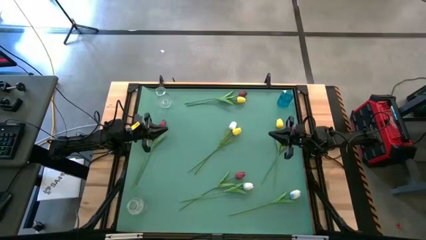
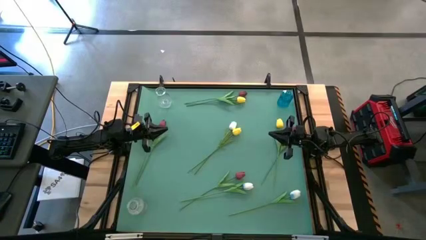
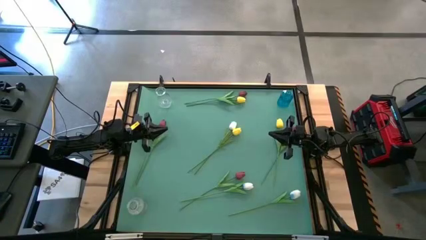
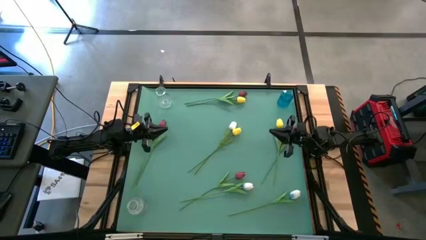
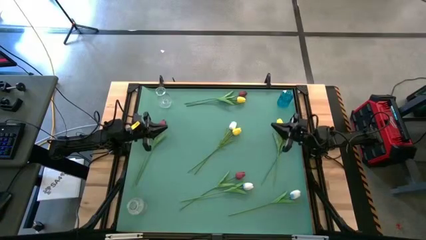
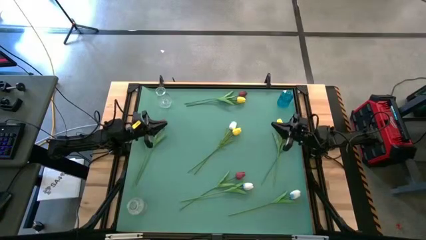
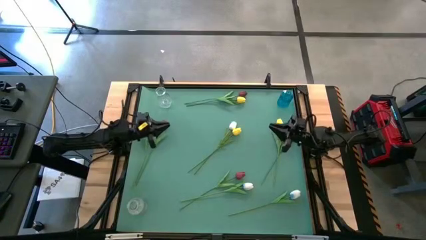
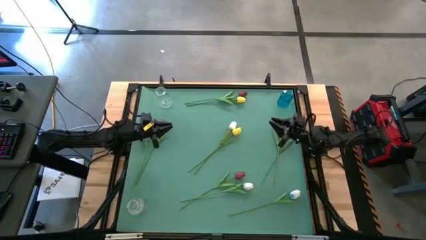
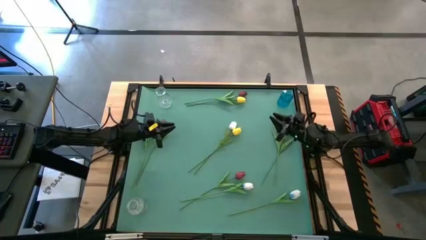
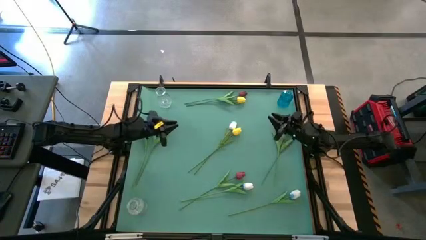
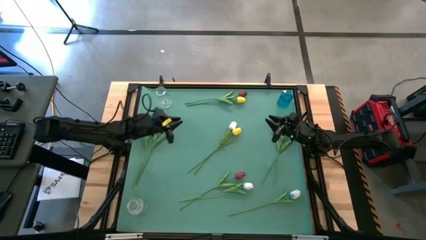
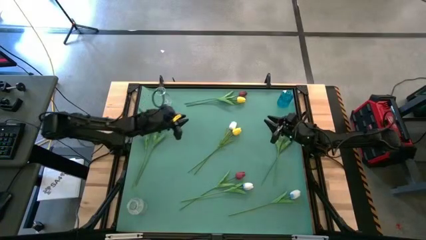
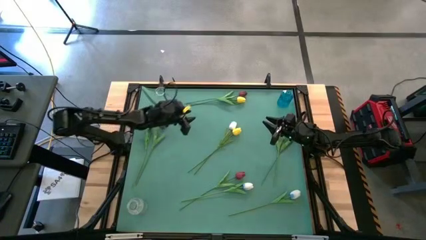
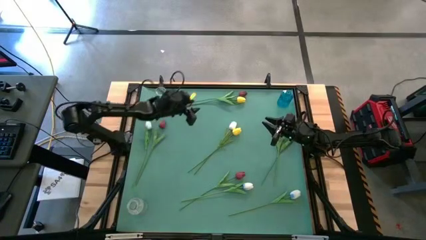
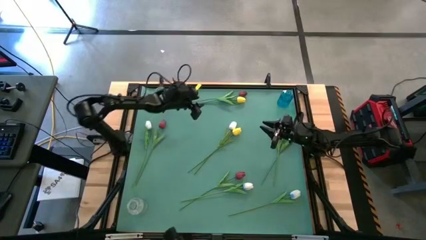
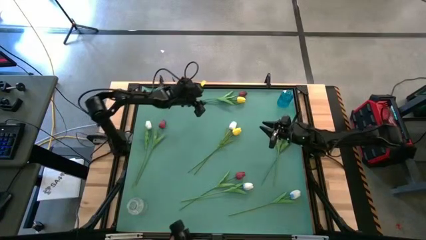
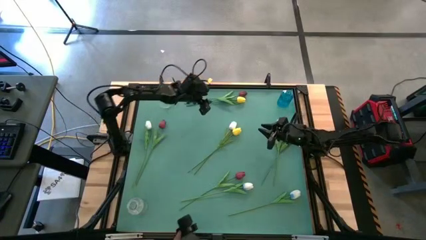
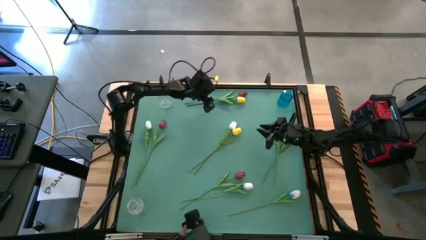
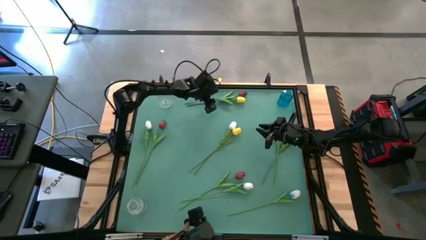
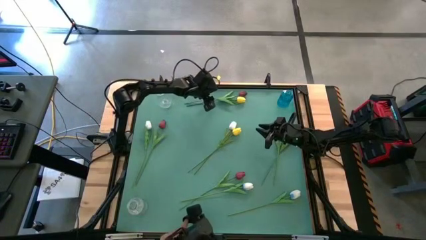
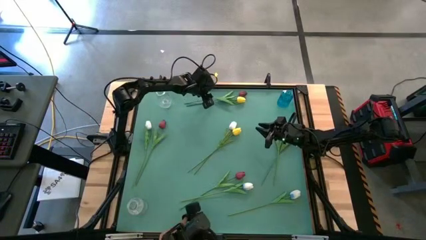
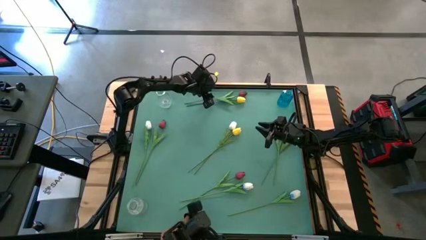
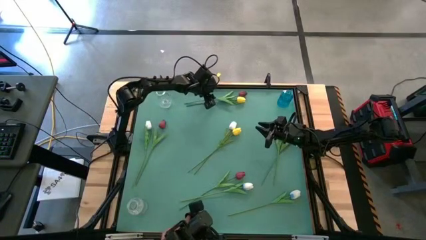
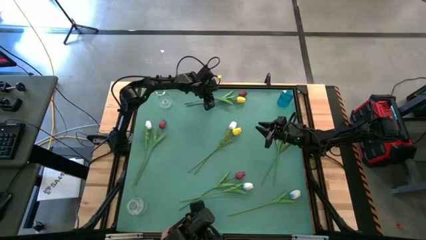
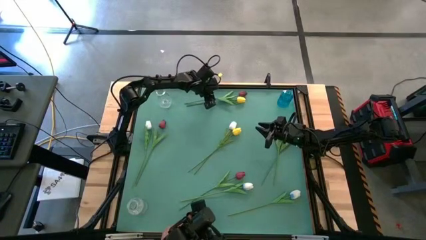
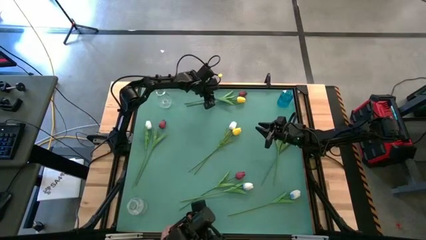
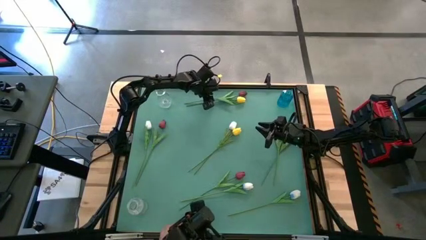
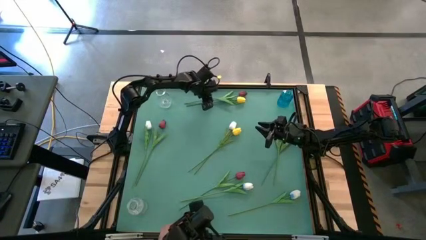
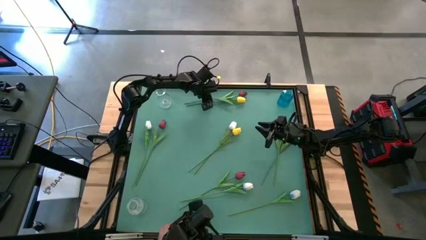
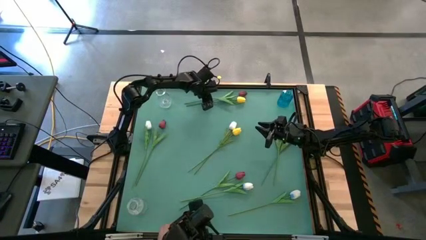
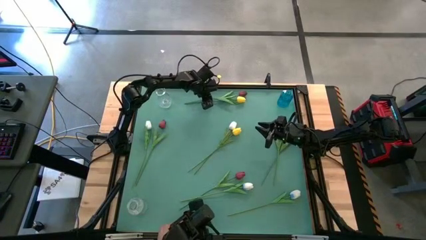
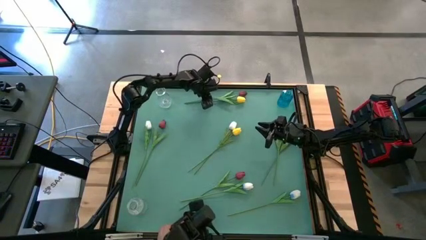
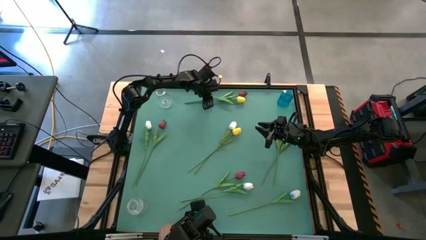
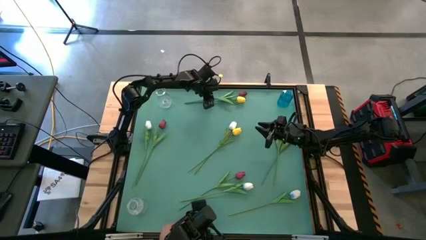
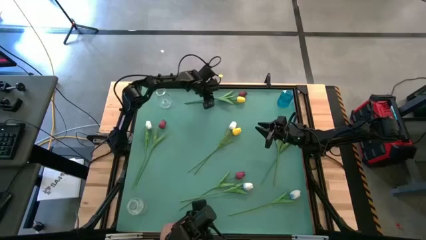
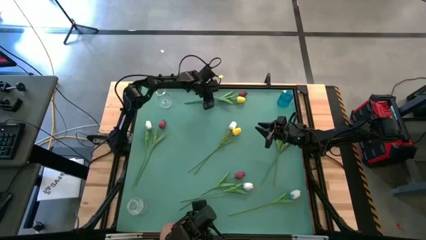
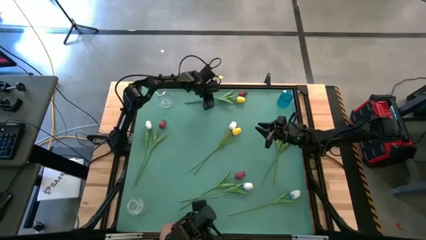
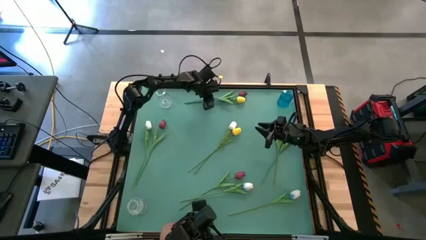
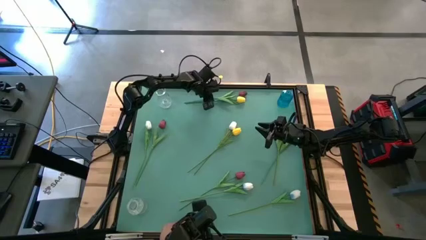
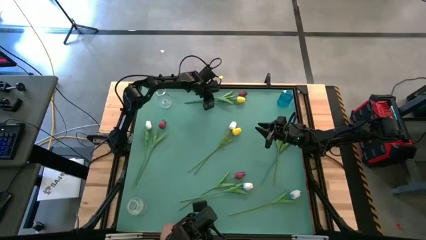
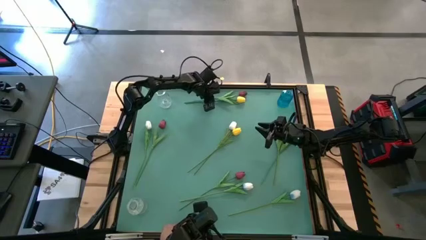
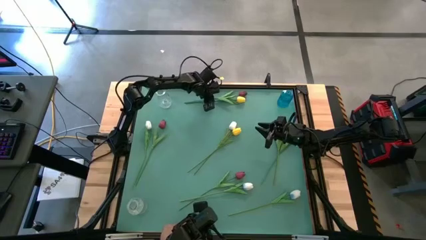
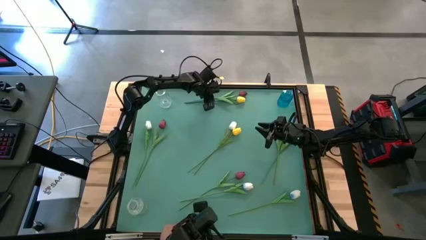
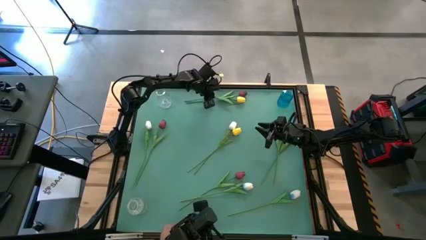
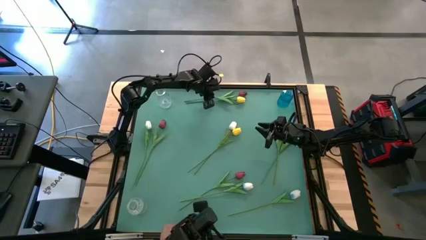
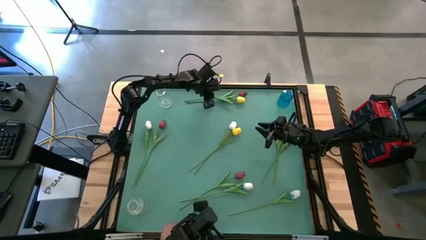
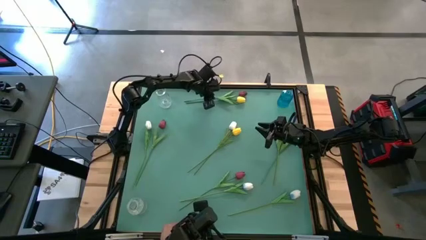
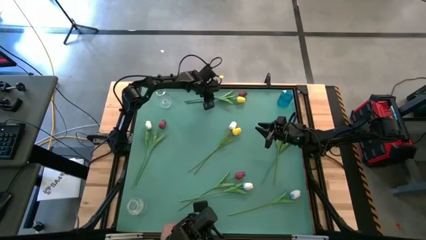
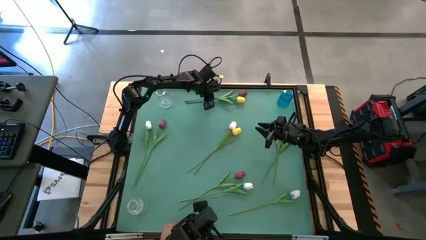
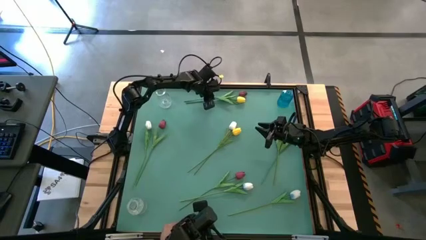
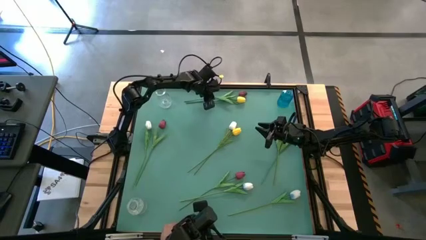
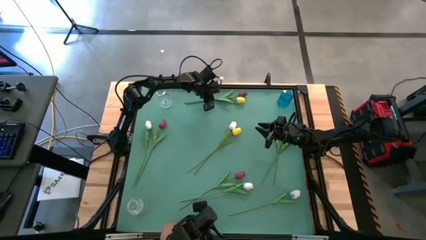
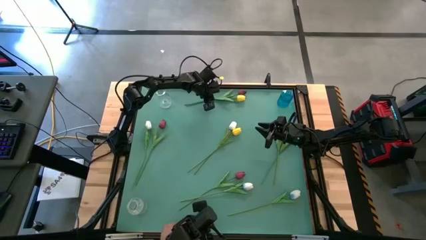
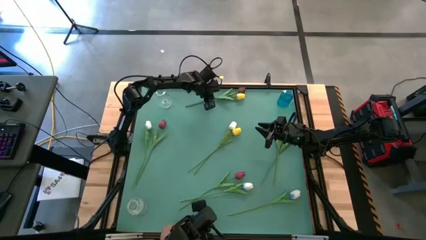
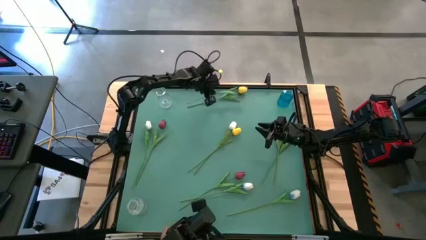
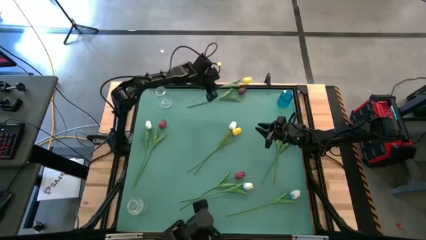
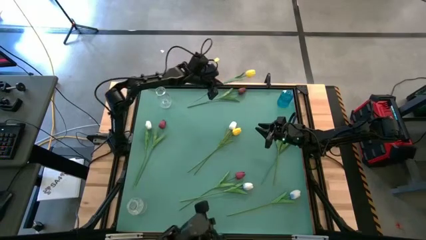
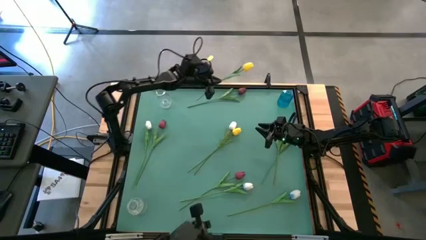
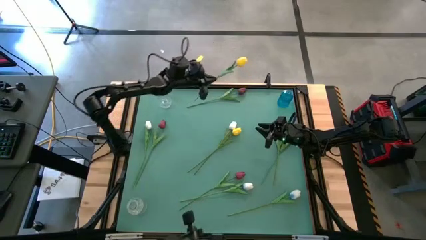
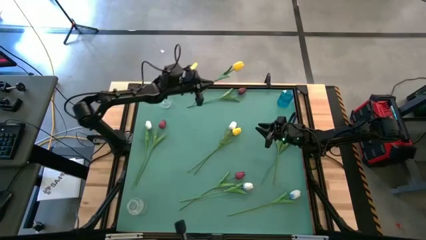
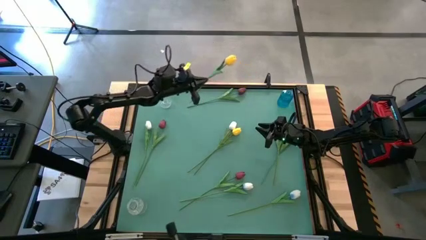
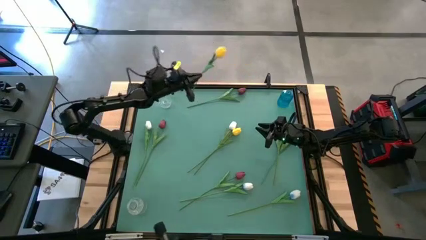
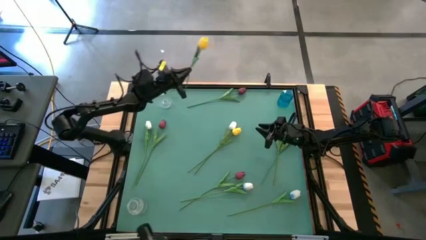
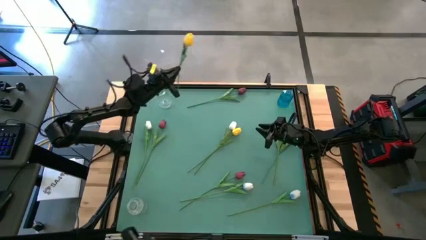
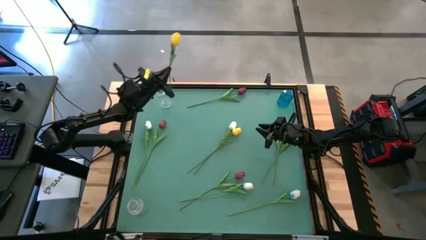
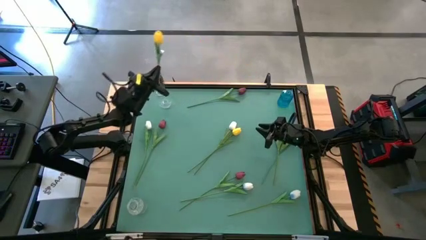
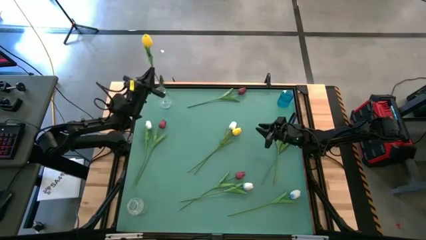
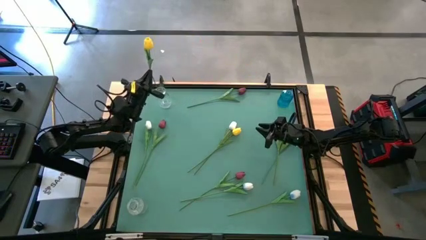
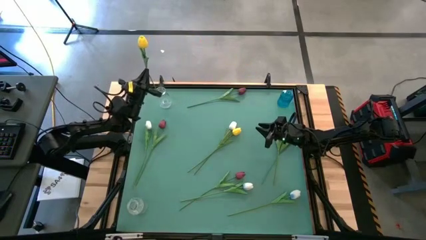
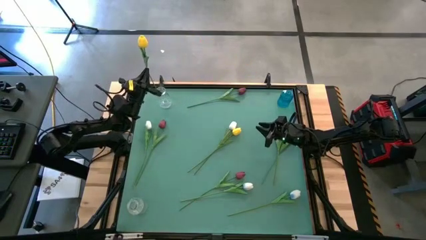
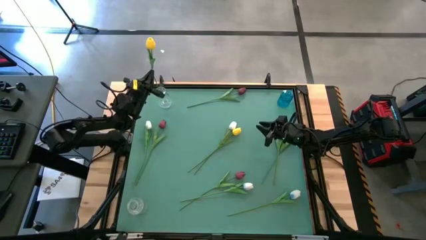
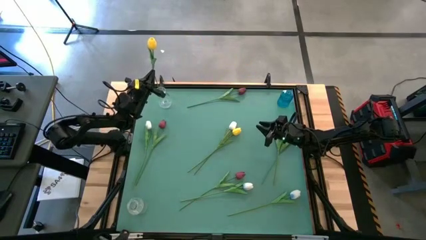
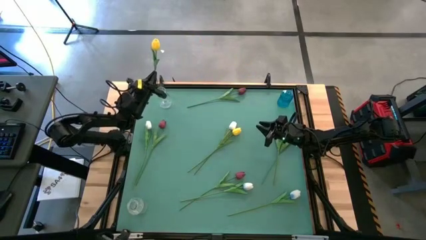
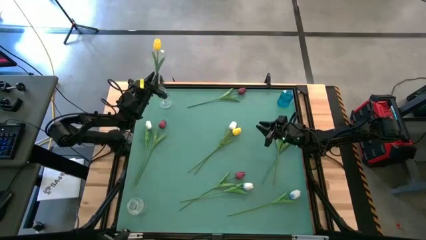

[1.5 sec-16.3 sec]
Task: Sort flowers into vase by color
Put the top yellow flower into the top transparent vase
